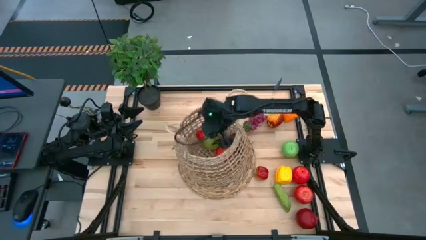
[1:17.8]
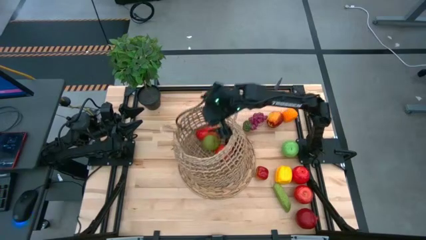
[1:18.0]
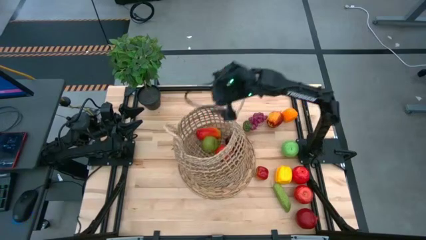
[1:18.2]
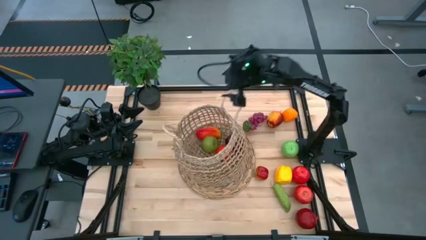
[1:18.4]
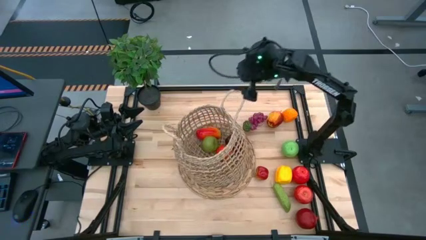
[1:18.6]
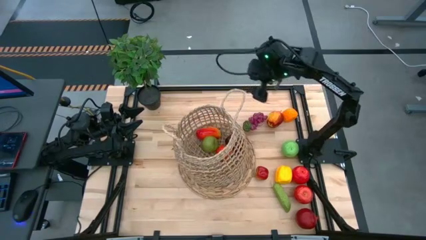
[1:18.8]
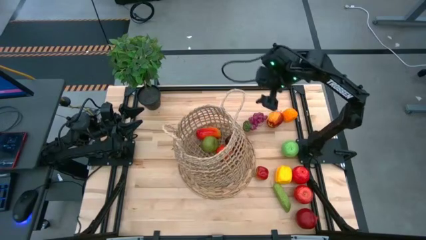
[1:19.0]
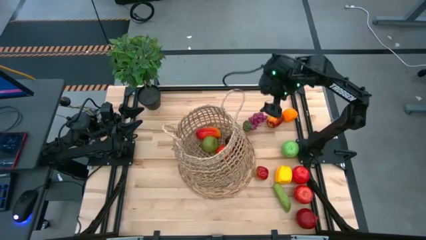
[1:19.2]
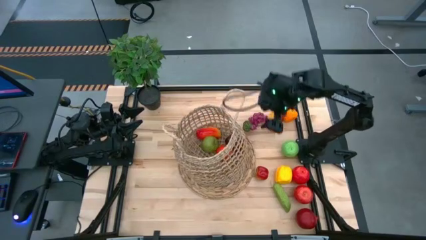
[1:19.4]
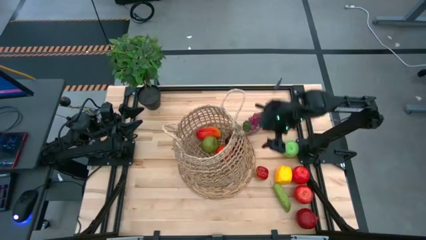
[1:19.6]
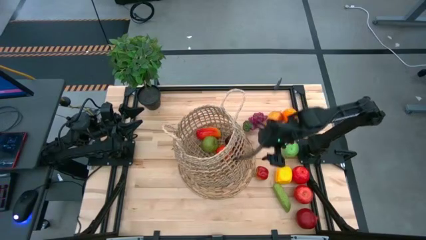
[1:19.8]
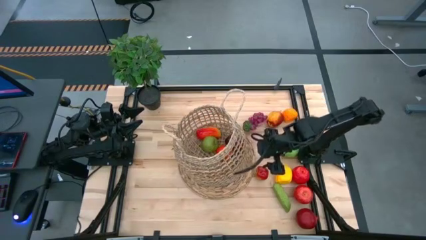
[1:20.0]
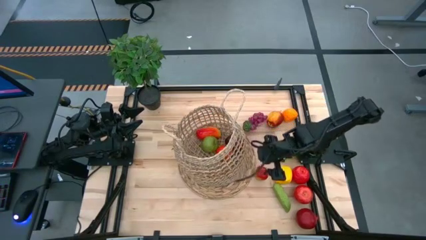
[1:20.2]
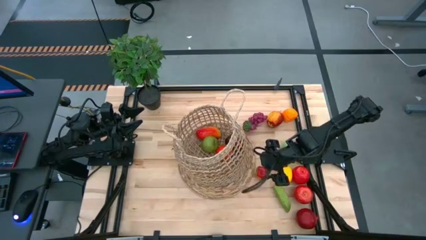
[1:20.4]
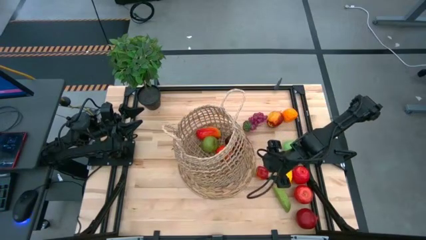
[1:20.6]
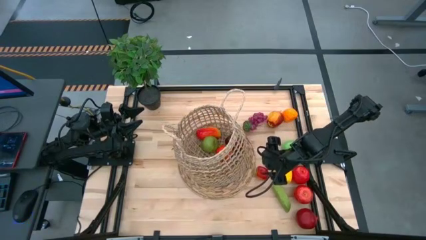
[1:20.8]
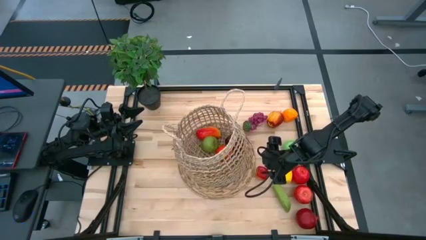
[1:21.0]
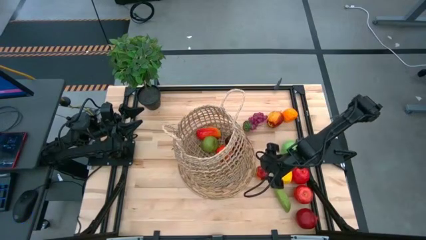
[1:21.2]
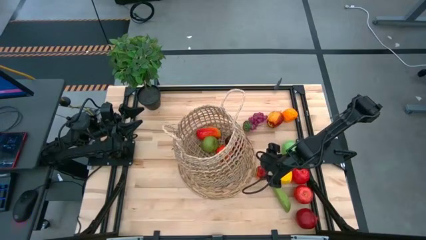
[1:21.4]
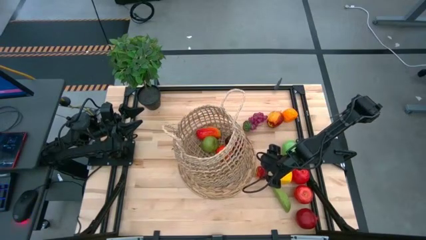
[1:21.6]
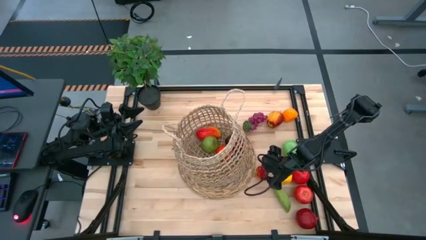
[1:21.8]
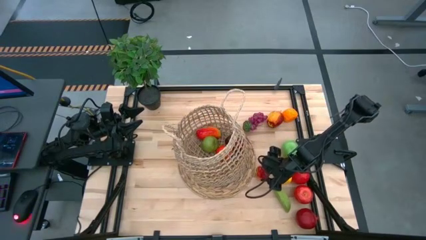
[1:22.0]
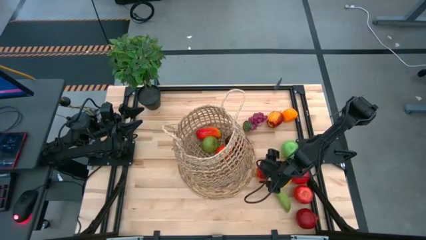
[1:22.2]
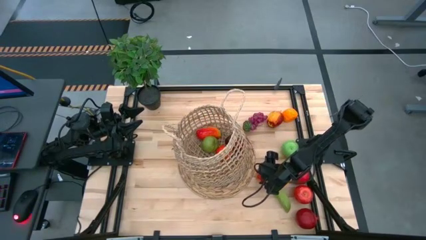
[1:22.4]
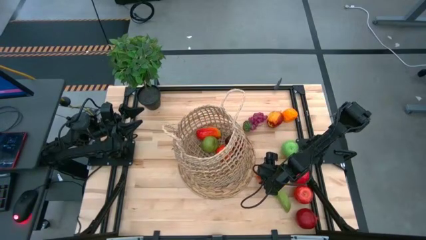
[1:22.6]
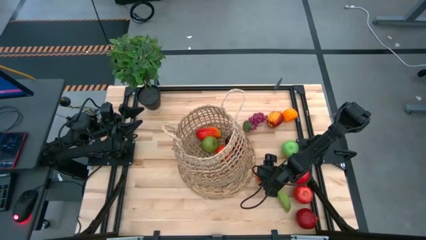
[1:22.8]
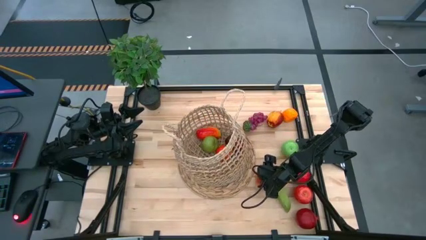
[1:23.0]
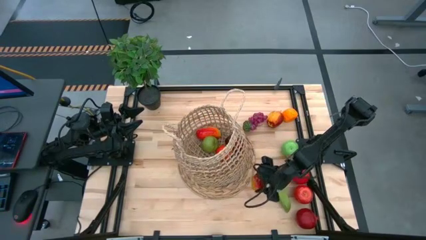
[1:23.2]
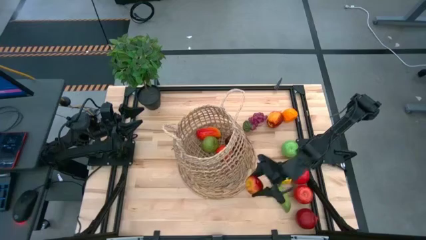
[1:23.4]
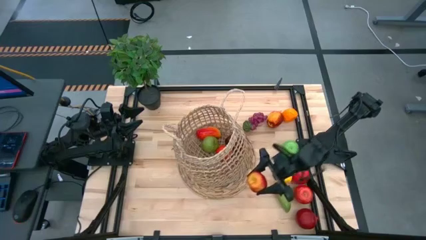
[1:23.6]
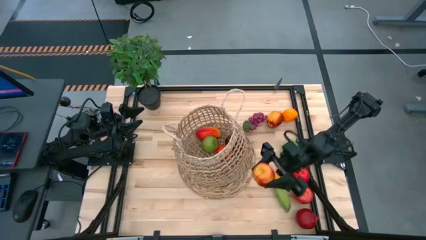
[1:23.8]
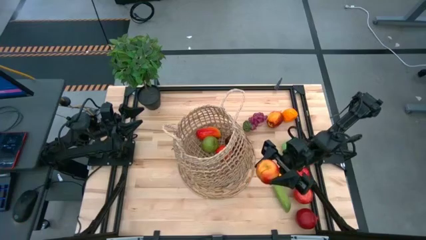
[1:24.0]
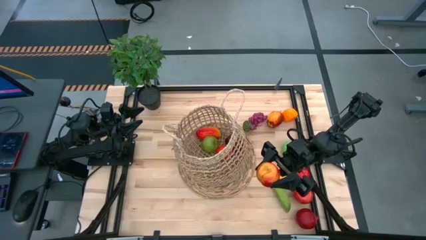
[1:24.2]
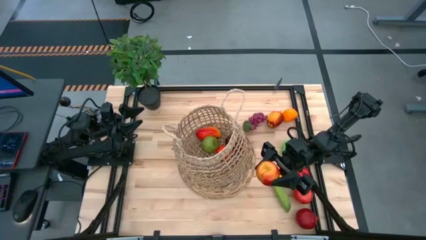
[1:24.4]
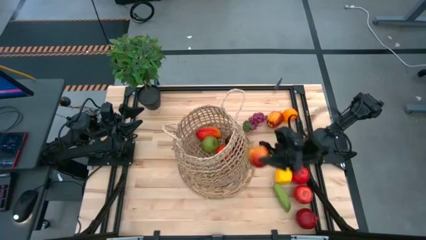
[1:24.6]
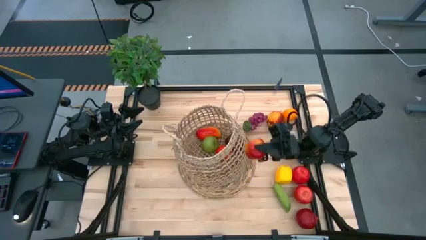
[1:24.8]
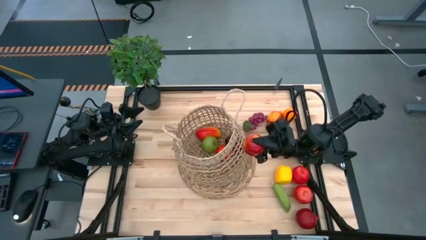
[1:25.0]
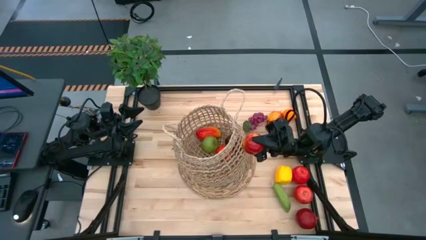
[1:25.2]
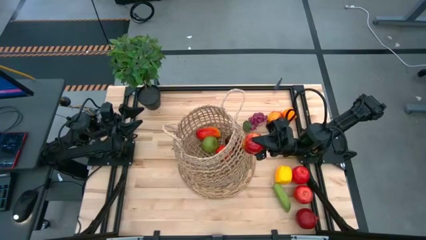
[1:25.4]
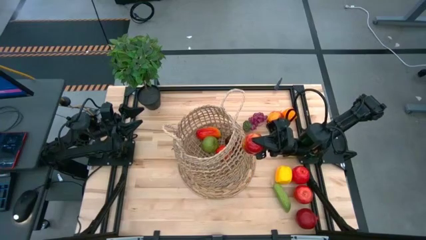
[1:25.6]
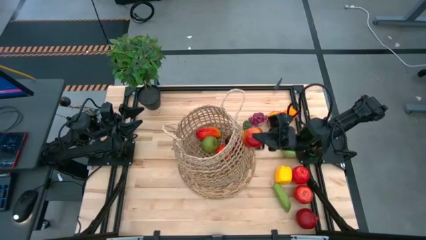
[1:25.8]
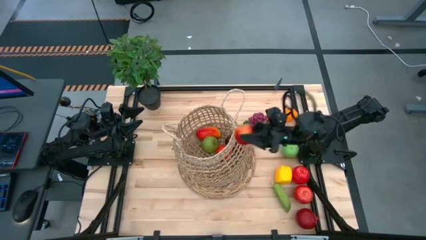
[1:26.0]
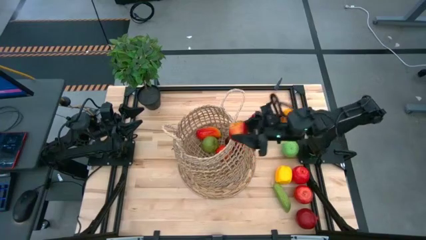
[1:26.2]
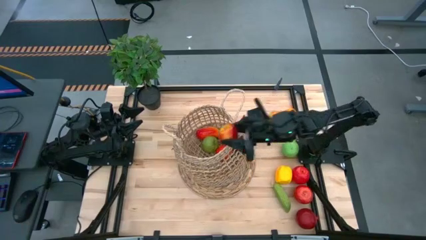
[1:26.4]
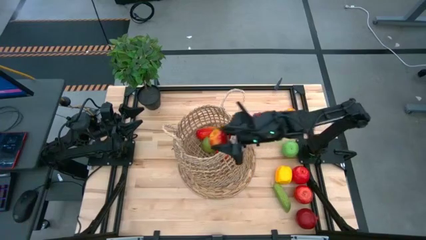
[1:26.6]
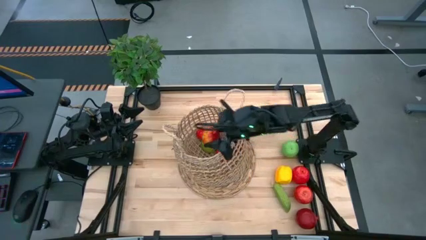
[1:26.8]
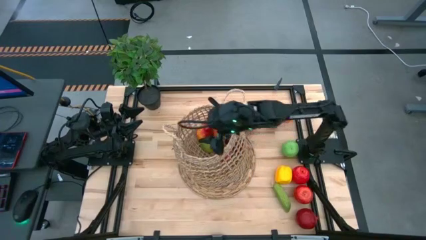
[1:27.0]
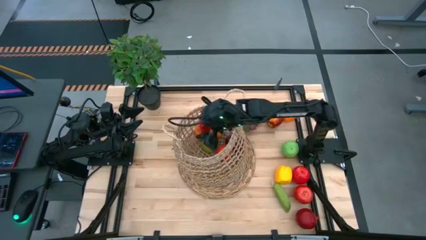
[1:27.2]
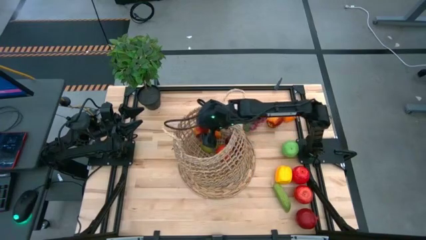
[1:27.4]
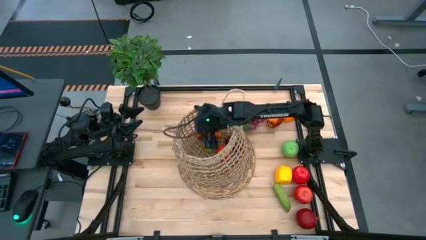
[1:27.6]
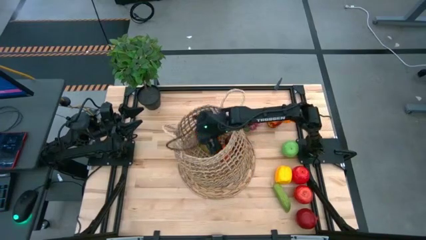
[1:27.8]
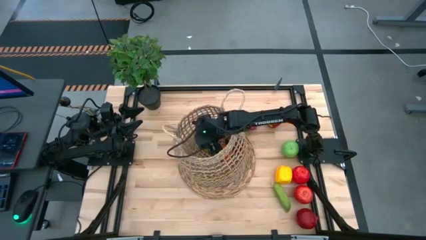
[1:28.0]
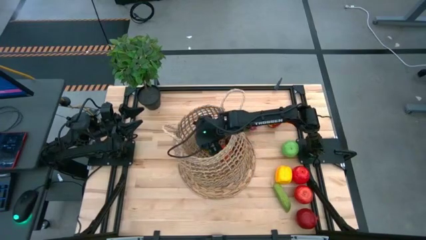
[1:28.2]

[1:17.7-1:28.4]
Task: Build produce basket
Put the bottom yellow red apple into the brown basket

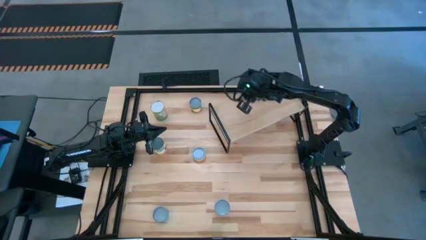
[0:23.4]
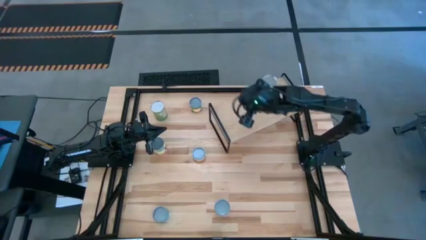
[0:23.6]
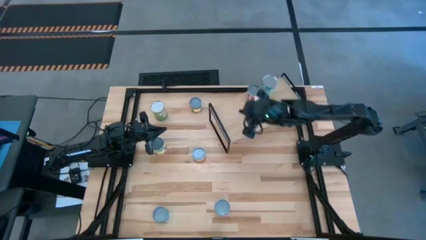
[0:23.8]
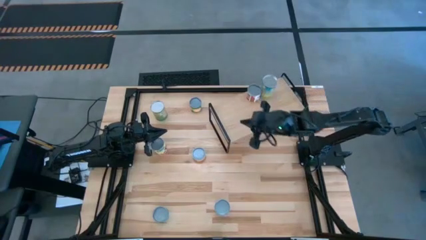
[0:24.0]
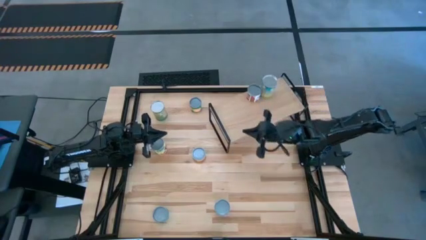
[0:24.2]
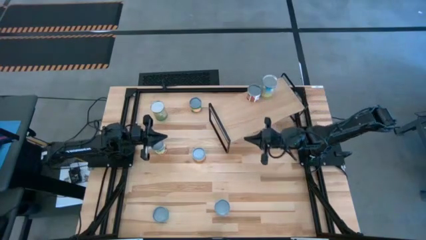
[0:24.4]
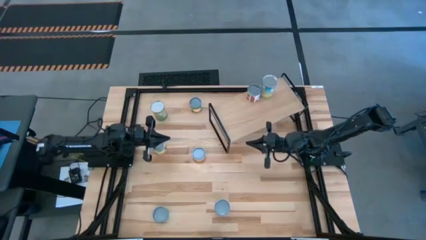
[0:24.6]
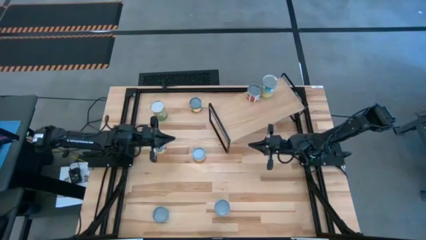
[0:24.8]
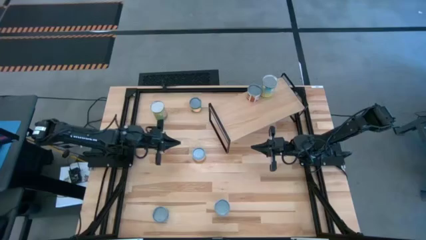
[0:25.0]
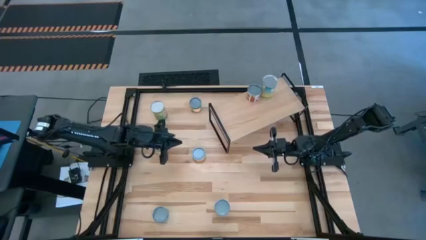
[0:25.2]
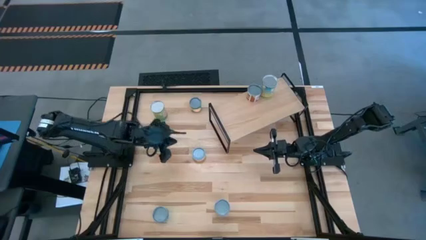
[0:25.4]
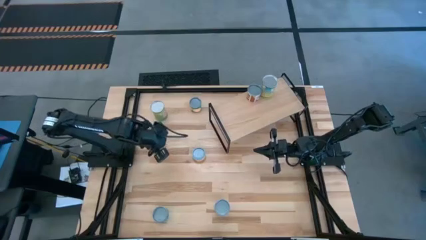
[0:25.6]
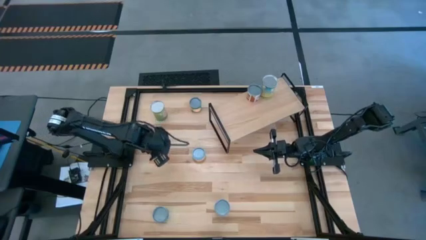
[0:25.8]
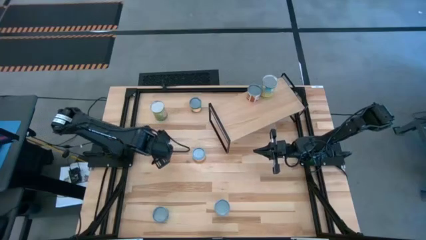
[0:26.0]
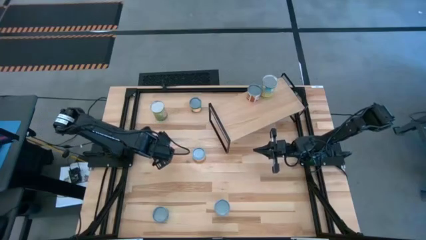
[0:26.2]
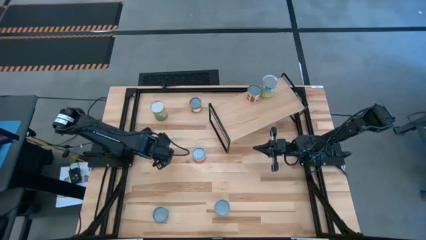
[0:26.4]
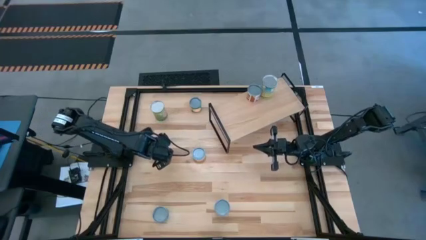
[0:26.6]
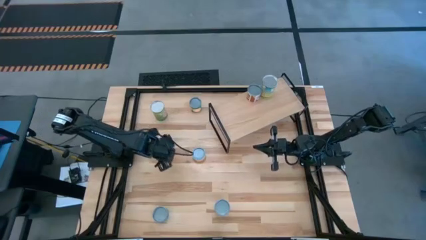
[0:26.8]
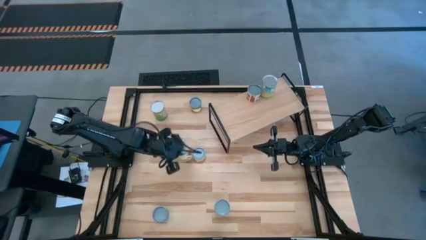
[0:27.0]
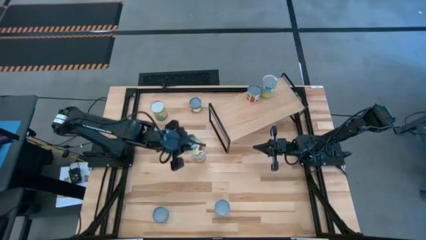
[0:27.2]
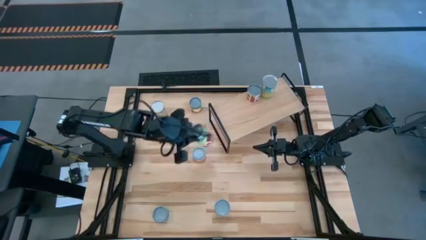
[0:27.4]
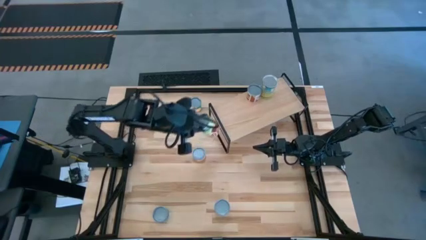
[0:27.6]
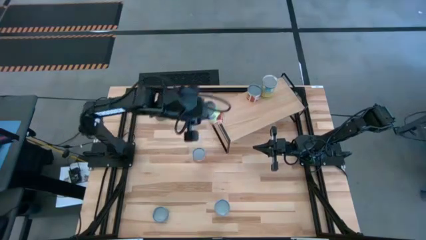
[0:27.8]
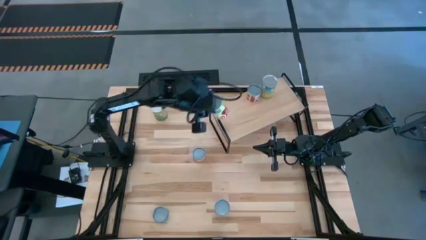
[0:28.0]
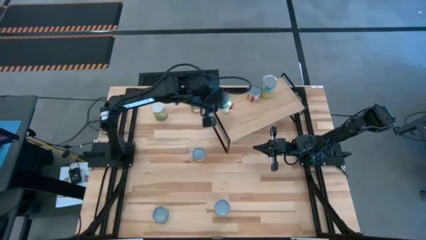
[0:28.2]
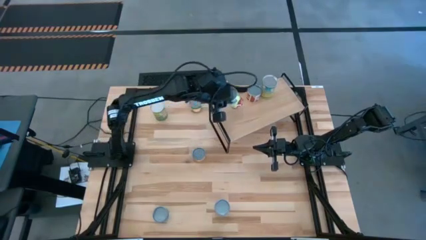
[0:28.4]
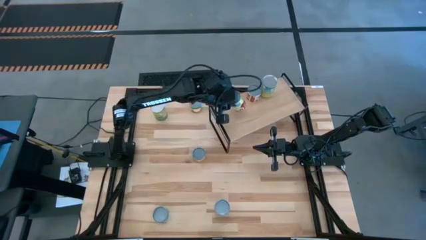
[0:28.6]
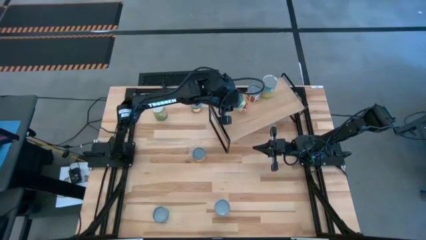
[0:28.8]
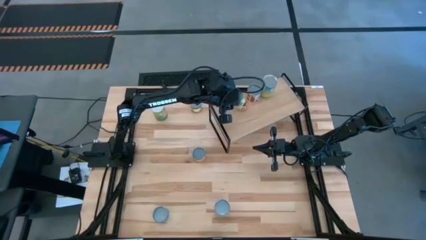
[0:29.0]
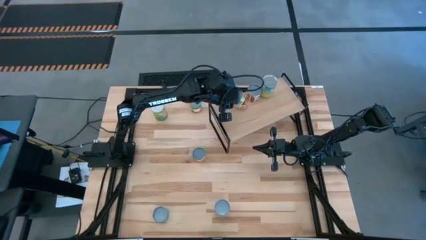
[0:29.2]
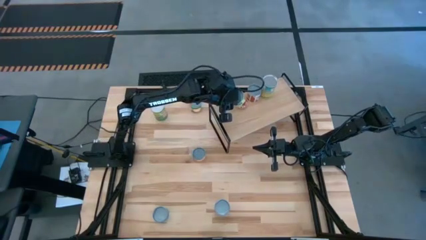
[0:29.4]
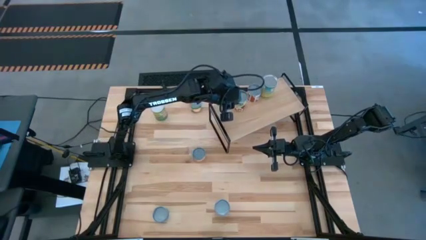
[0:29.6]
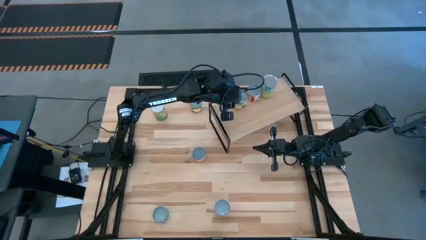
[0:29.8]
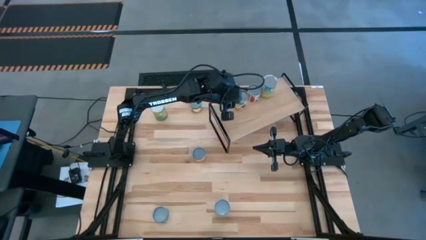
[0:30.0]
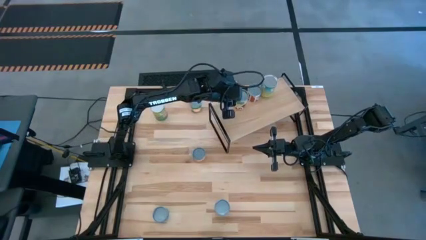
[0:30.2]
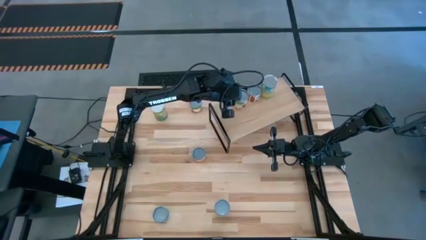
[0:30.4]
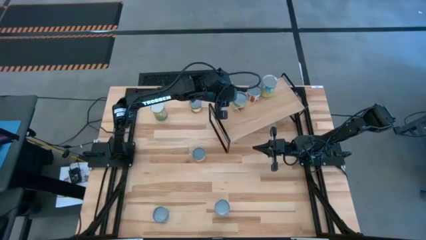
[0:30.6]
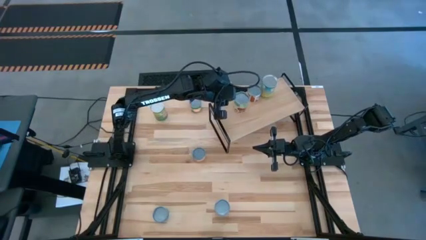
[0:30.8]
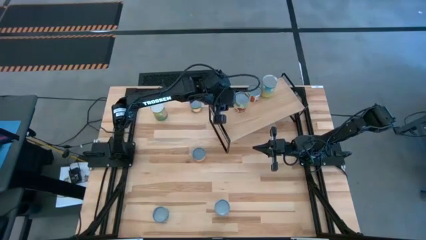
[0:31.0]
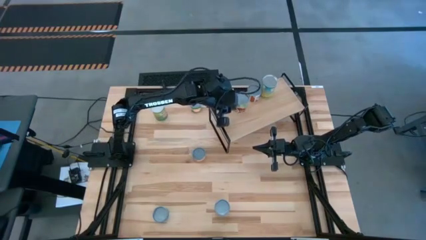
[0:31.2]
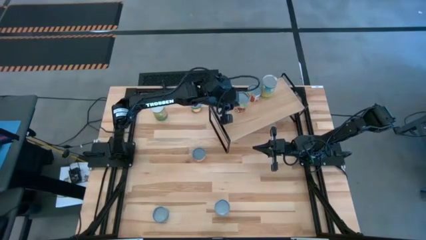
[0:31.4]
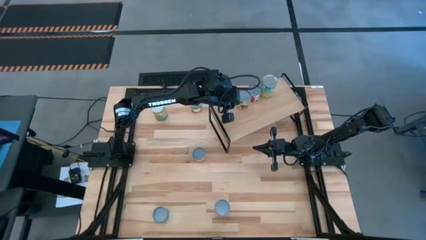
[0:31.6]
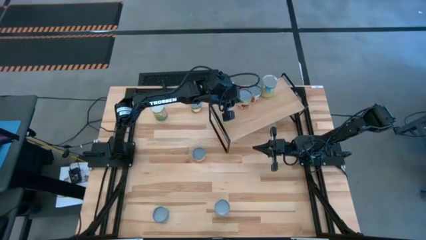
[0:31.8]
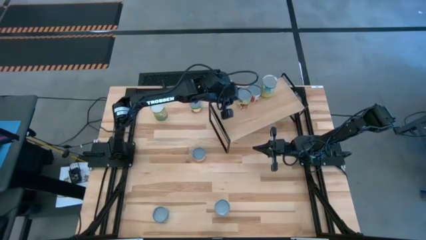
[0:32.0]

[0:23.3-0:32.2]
Task: Pick and place cans onto a shelf
Put the canned spaghetti sauce on the shelf
